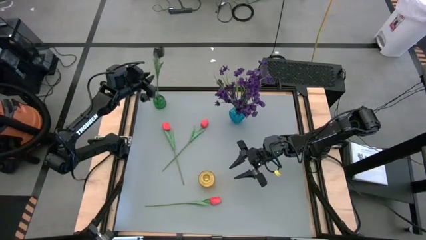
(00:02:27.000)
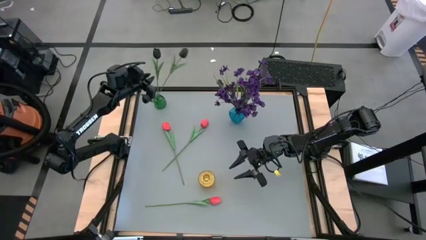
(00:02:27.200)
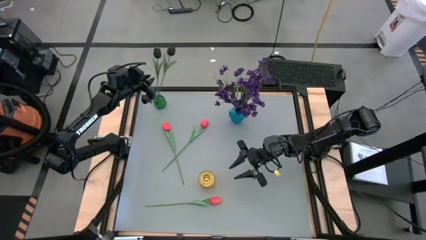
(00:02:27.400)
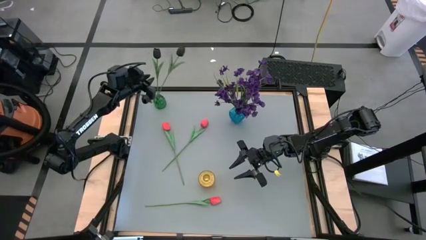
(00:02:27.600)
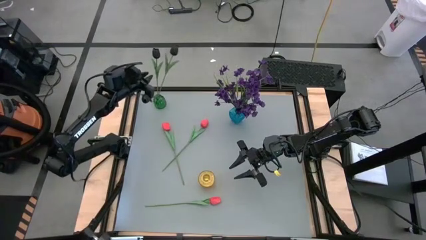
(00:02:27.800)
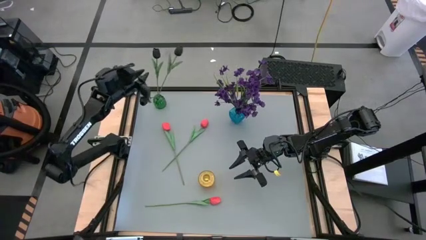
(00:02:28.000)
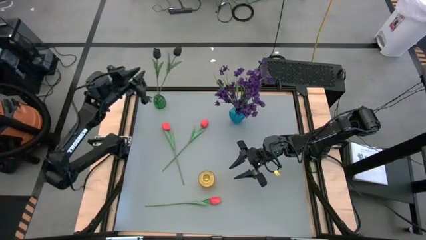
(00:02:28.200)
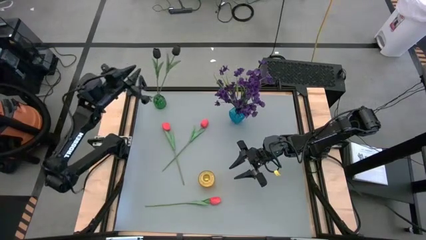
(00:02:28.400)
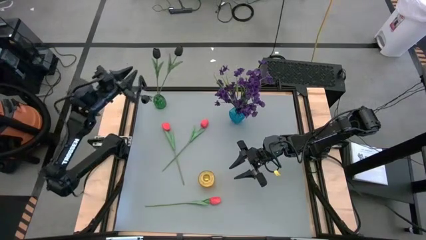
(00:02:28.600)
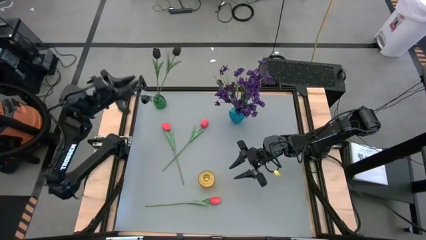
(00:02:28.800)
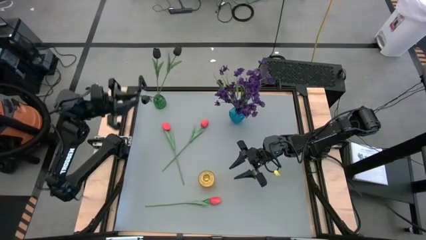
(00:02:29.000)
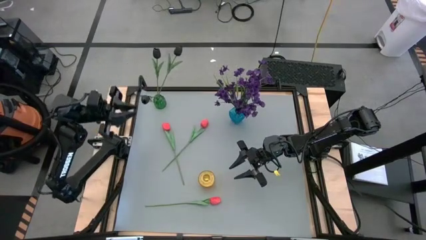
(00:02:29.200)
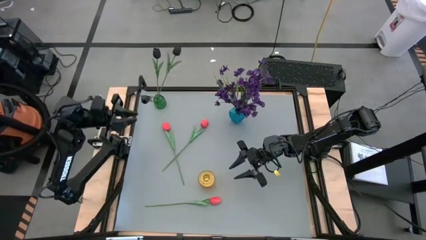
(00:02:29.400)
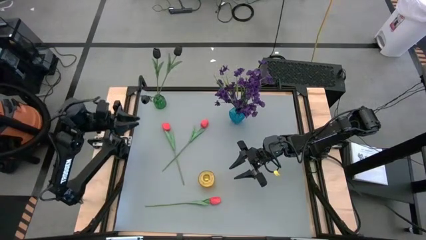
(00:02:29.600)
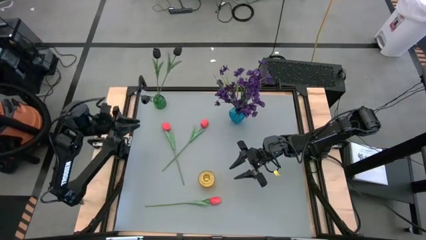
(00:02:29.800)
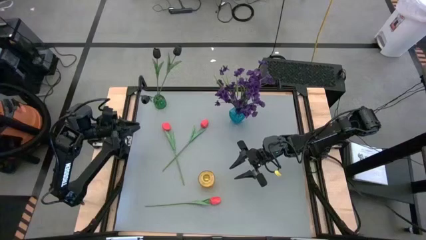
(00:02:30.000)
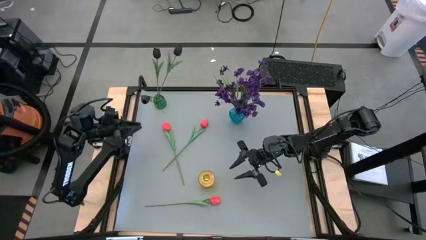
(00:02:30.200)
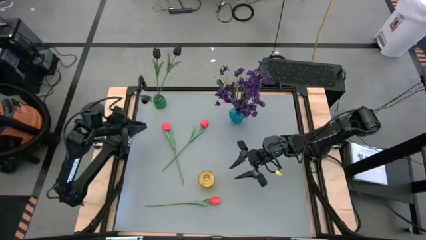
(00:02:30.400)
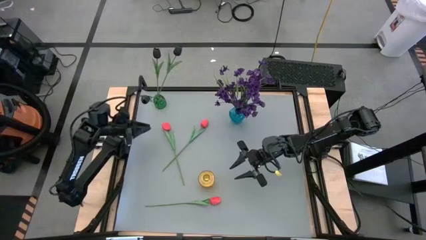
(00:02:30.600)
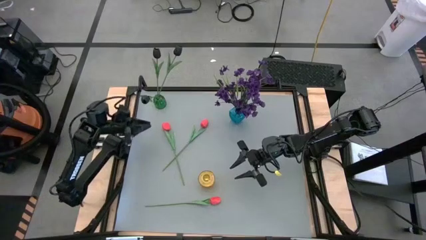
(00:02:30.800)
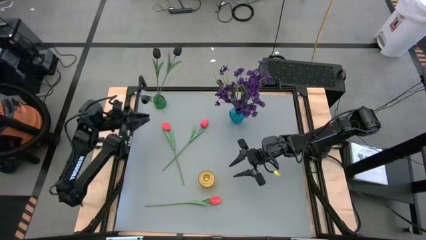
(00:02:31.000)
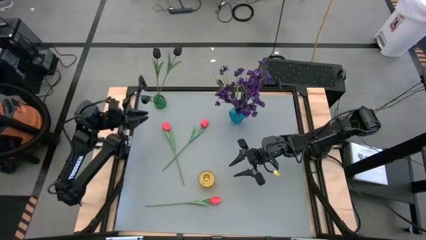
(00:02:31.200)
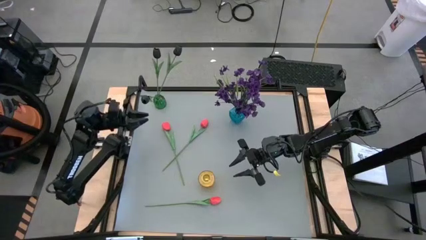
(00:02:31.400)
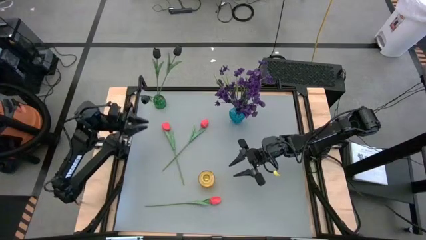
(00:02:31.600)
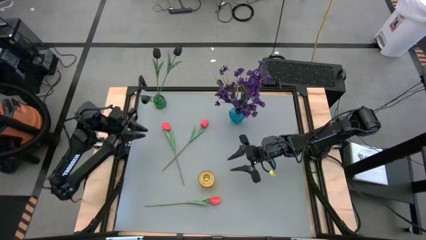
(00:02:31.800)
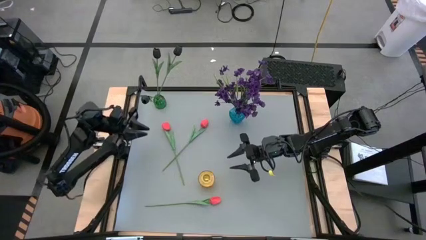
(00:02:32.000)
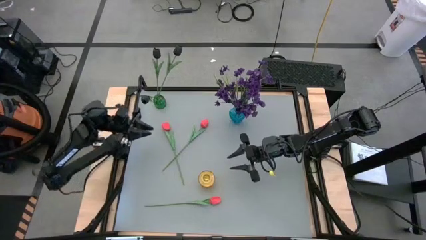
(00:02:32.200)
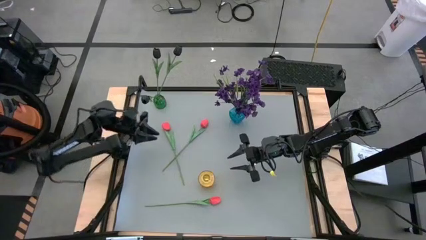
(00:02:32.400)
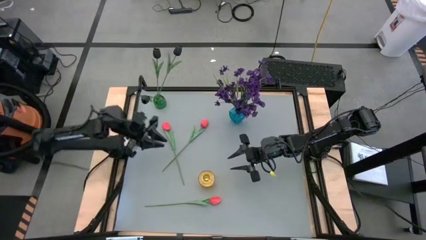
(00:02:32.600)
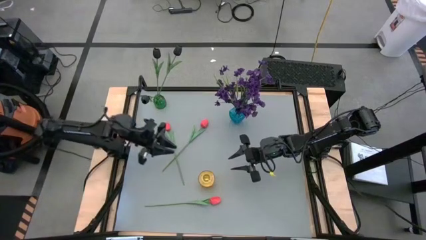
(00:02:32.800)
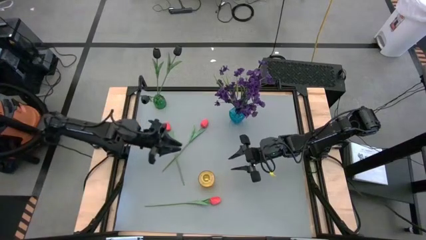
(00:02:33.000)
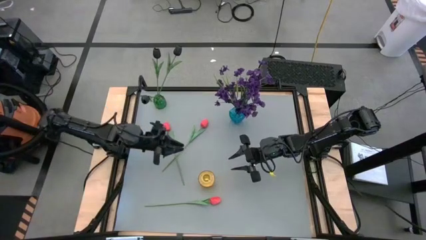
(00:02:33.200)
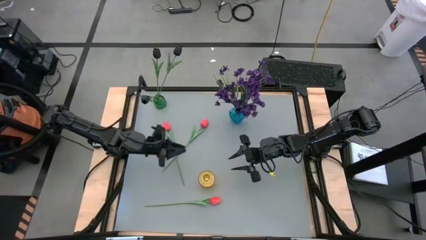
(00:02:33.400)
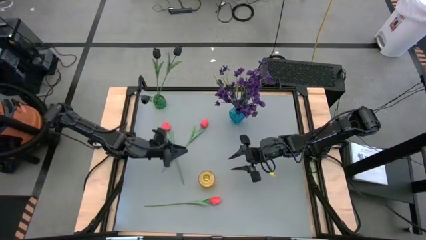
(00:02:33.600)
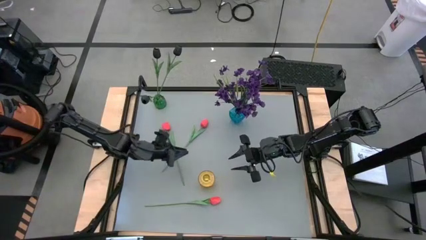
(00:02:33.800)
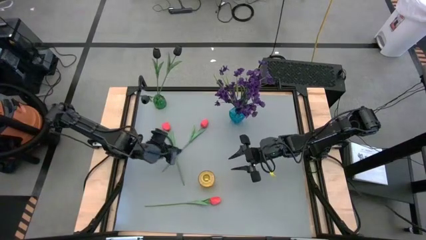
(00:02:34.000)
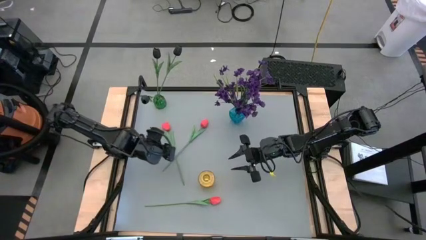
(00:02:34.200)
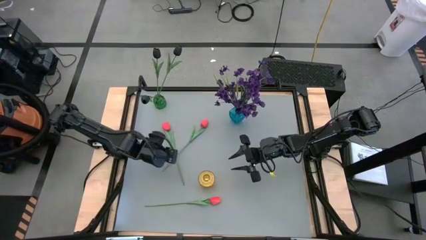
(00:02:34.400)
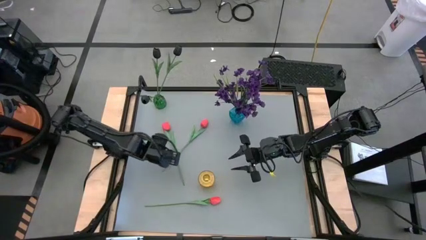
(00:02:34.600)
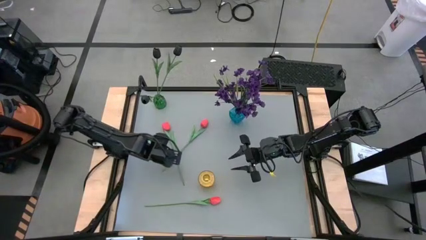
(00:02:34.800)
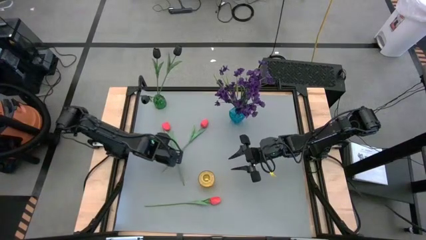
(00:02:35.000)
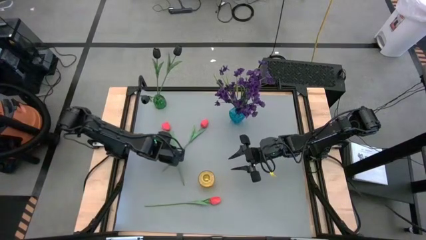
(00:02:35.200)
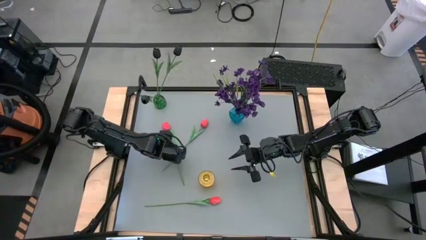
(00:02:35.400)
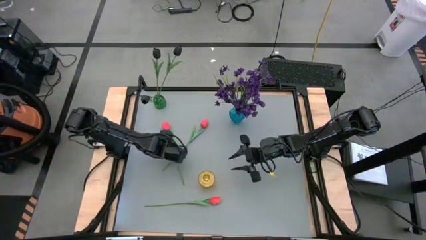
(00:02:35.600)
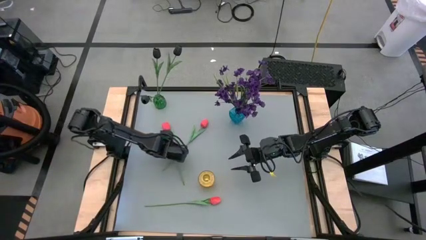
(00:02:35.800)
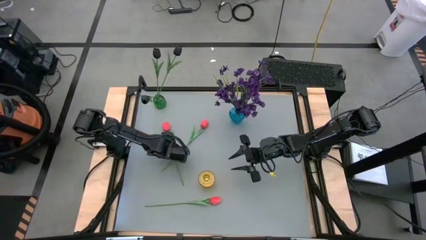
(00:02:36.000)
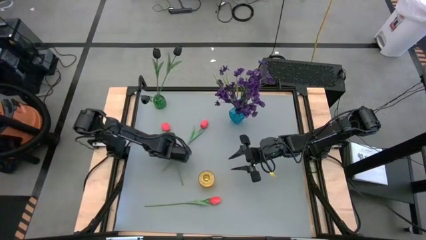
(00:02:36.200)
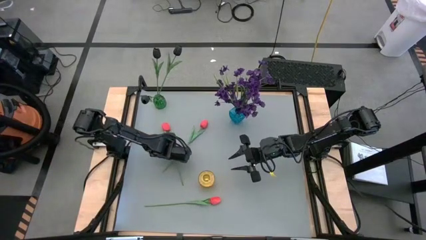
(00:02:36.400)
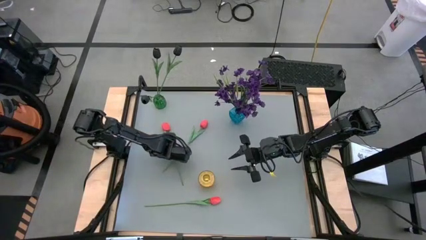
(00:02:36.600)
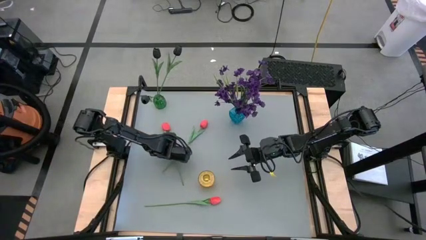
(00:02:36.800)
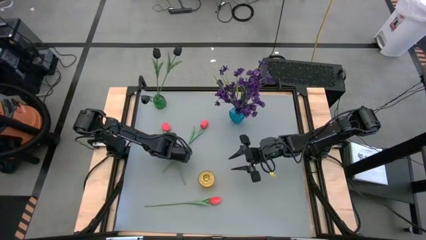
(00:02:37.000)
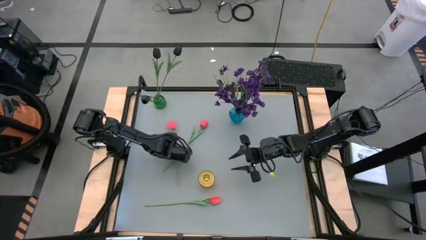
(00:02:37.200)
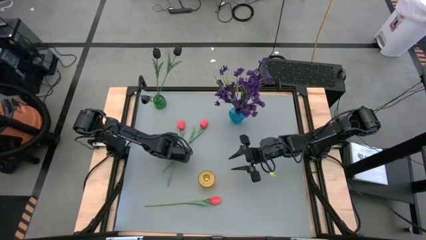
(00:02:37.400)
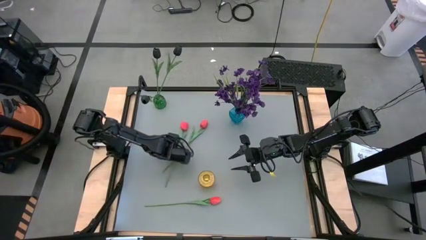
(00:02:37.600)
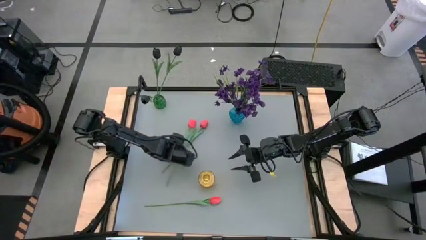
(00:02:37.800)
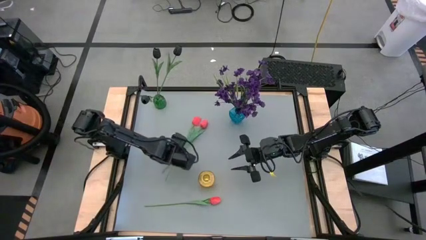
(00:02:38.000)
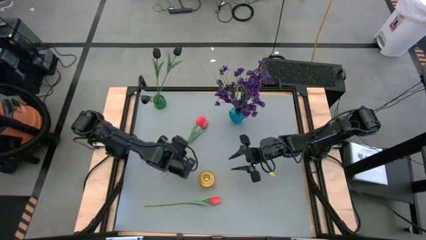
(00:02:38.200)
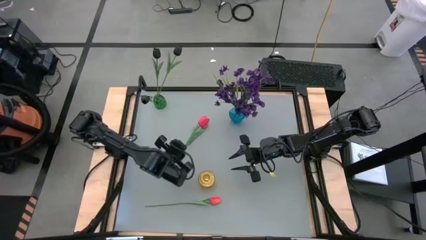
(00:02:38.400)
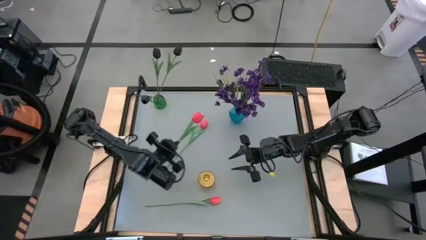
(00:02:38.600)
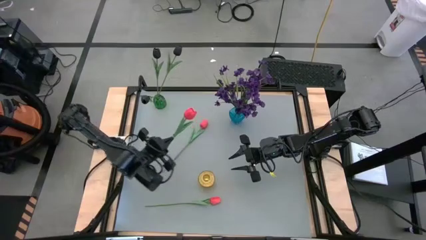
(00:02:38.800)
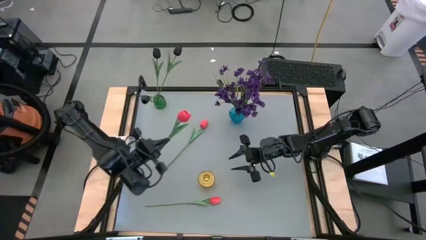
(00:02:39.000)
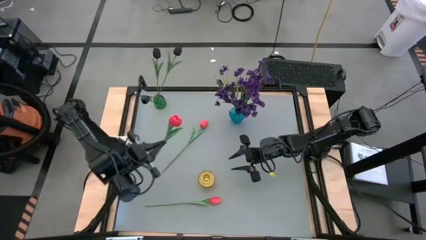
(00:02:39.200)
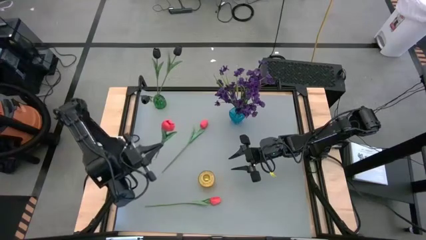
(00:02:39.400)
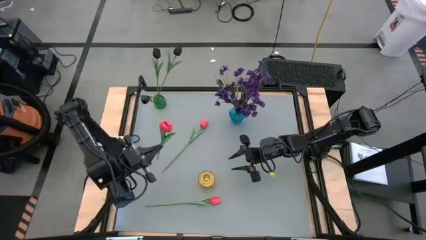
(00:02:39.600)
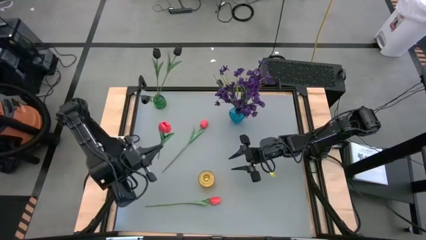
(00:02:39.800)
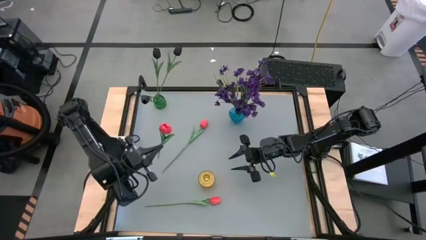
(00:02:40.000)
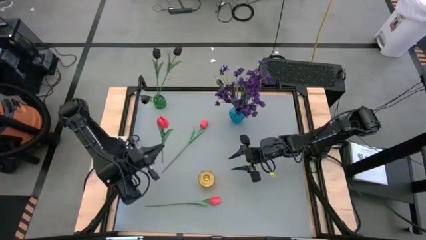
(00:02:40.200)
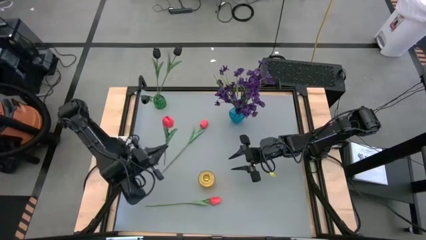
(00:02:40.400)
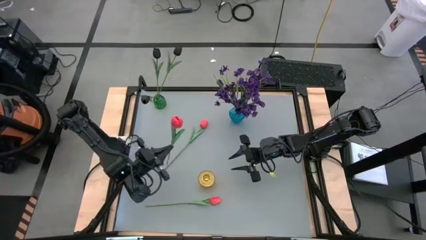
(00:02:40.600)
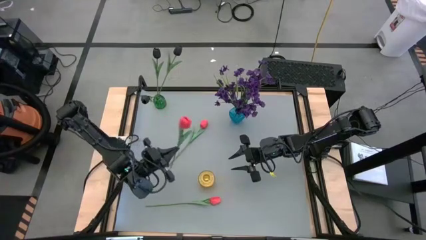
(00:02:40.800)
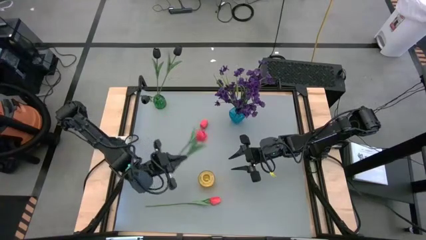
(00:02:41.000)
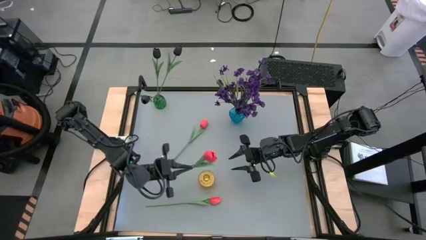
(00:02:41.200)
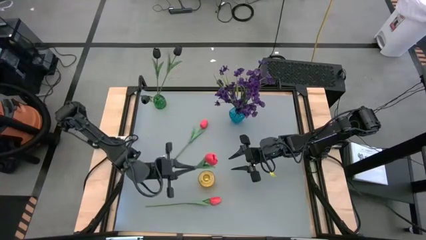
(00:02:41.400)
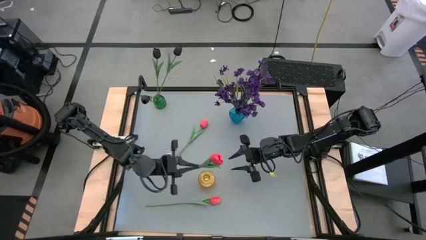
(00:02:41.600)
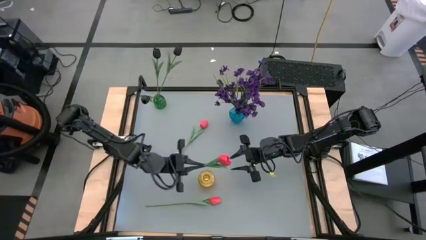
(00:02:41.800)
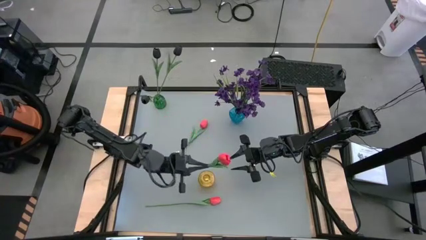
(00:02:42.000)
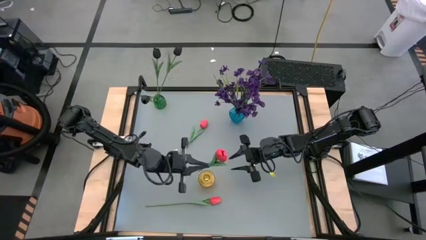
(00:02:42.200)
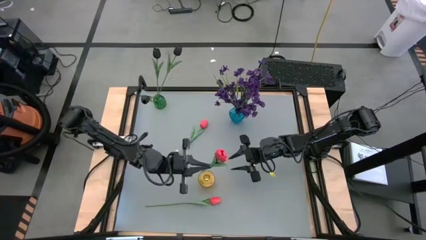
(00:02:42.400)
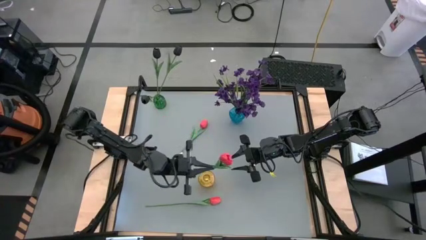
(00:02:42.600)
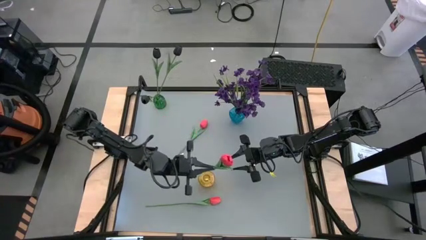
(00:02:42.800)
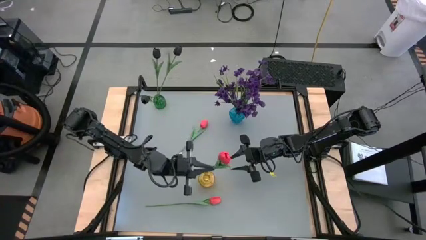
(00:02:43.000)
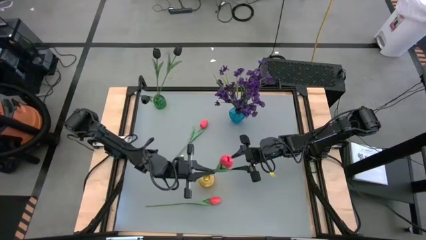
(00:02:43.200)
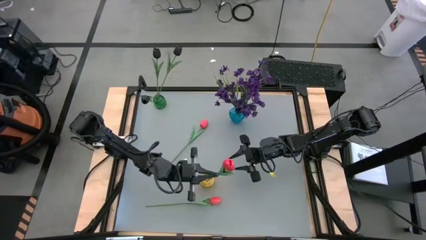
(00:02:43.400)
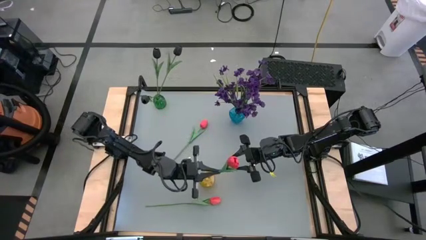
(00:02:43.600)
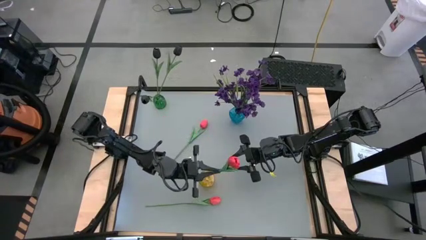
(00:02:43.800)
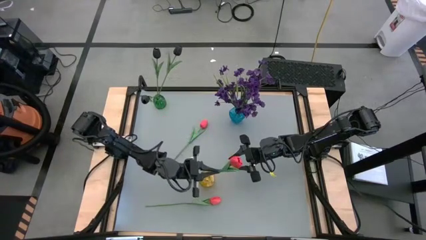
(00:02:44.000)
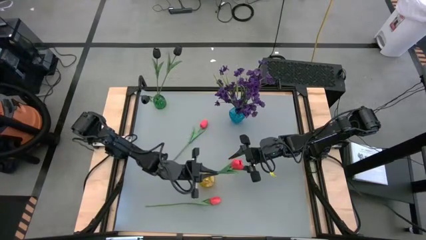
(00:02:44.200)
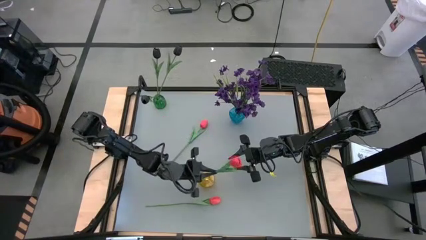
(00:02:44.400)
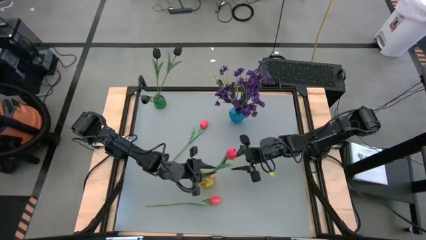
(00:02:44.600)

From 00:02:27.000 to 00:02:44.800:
Task: Sort flowers into vase by color
Put the top left pink flower into the yellow vase
